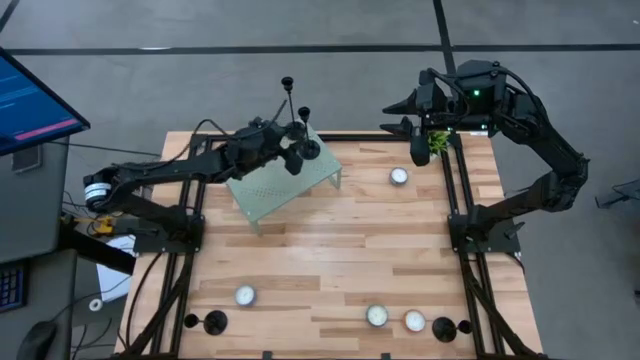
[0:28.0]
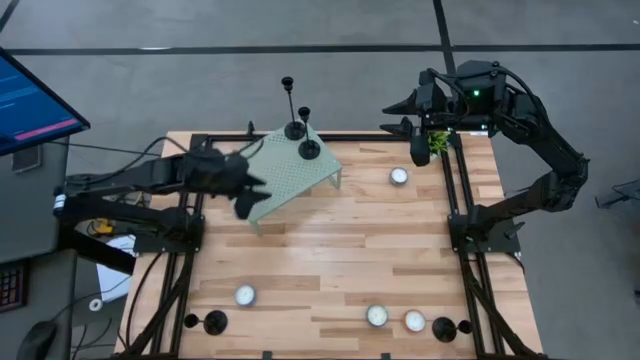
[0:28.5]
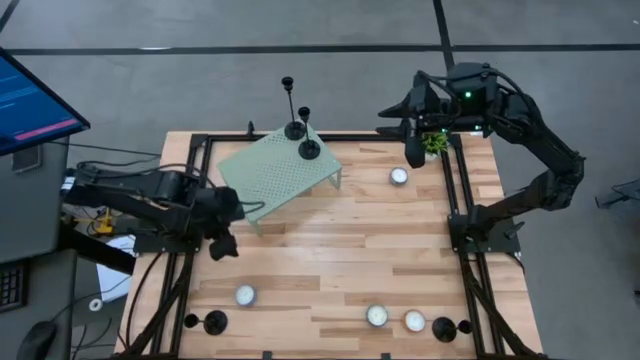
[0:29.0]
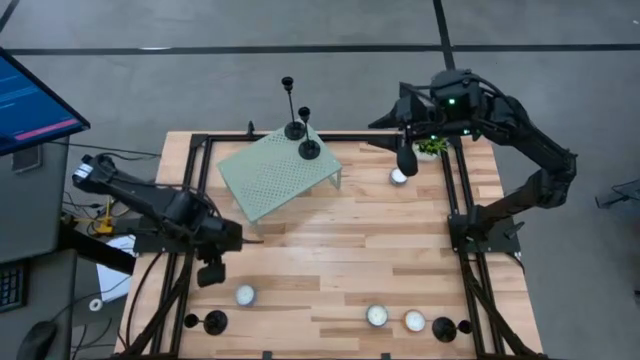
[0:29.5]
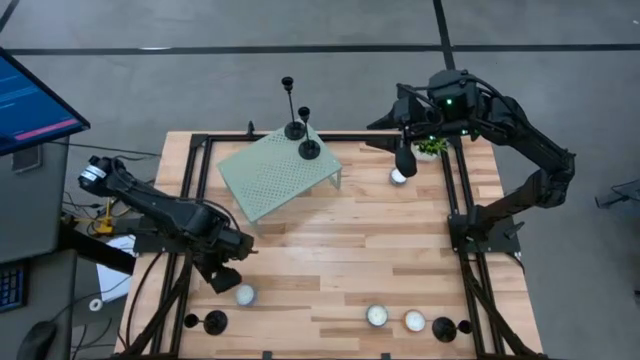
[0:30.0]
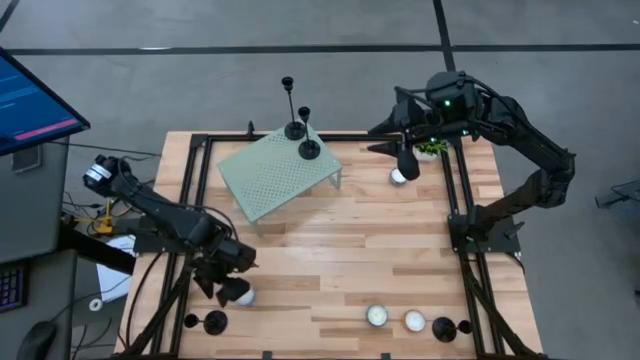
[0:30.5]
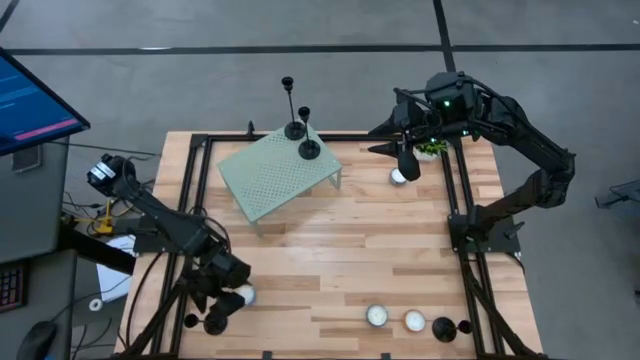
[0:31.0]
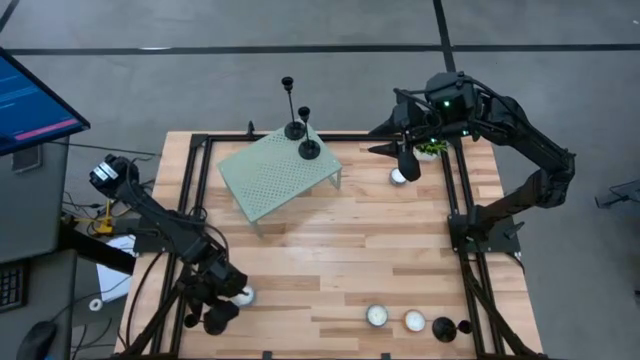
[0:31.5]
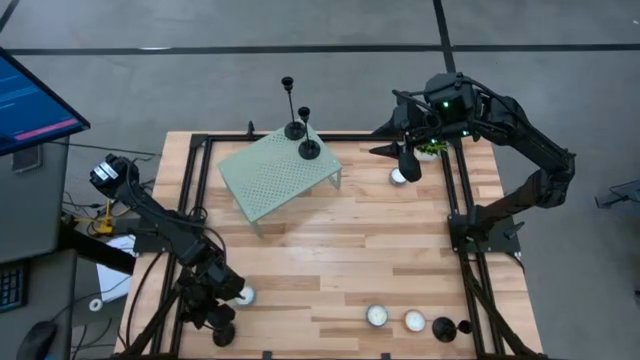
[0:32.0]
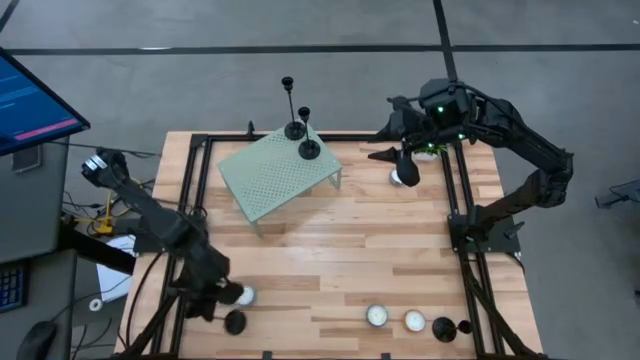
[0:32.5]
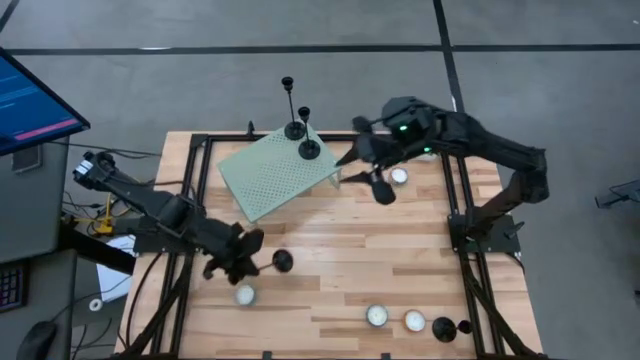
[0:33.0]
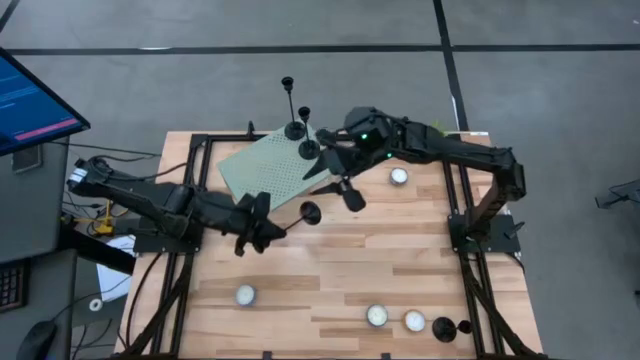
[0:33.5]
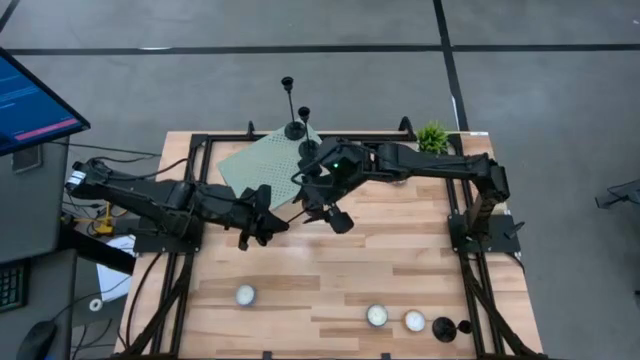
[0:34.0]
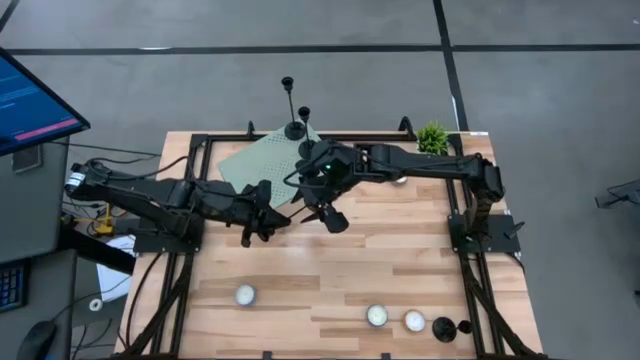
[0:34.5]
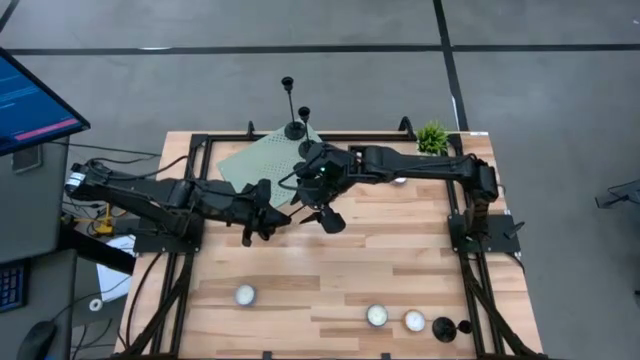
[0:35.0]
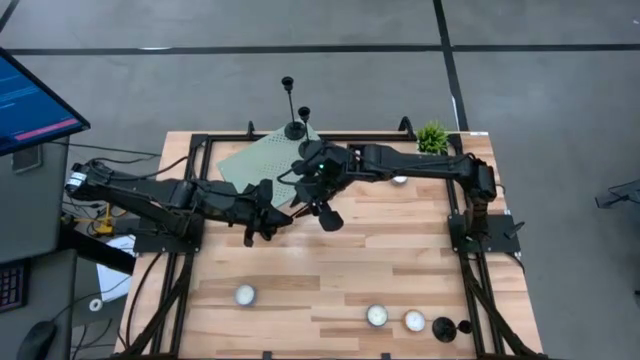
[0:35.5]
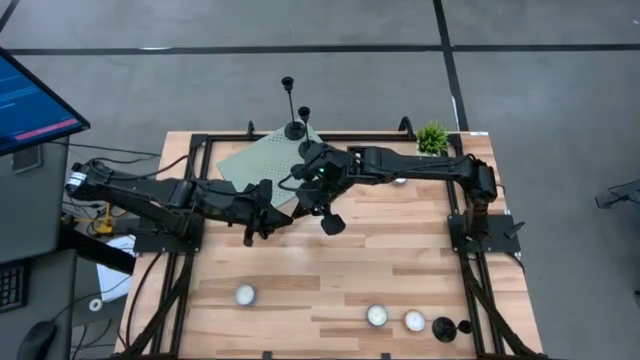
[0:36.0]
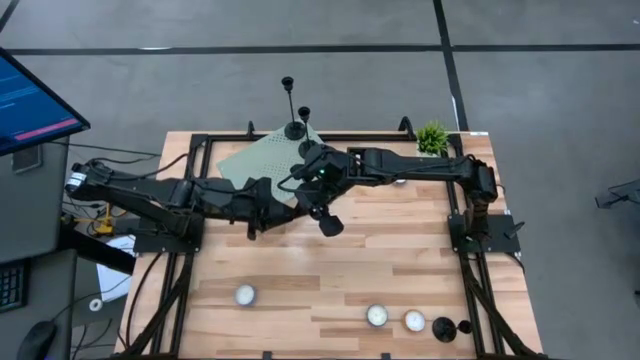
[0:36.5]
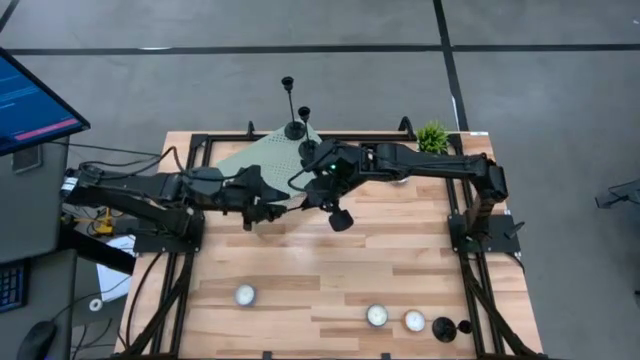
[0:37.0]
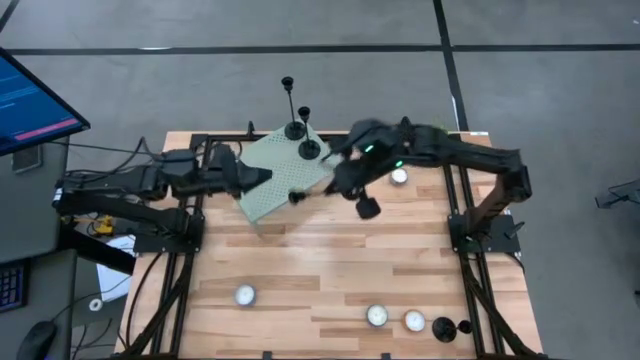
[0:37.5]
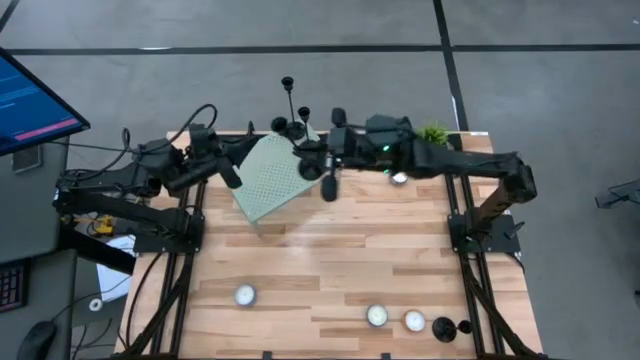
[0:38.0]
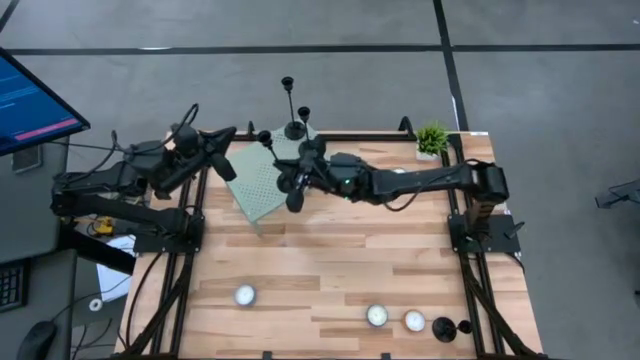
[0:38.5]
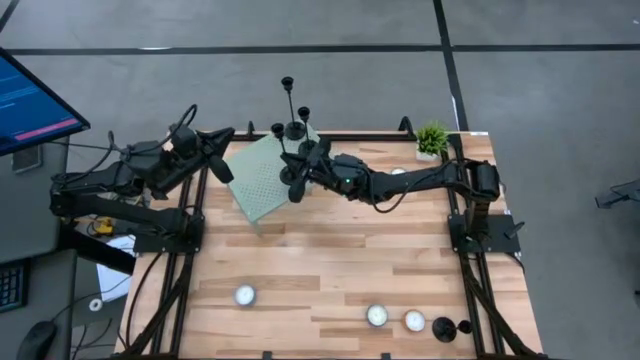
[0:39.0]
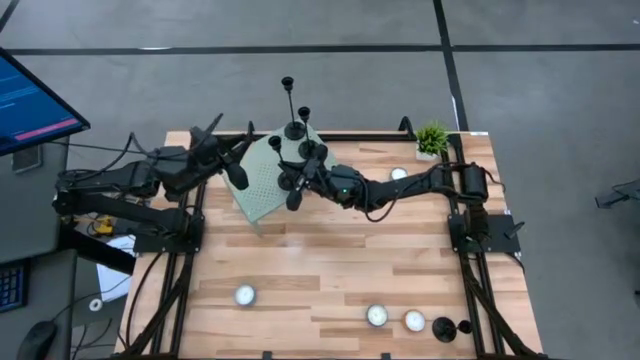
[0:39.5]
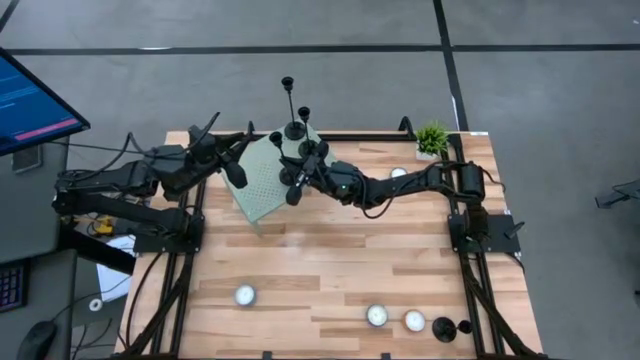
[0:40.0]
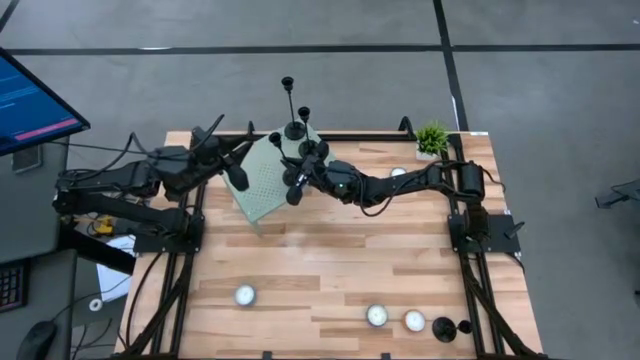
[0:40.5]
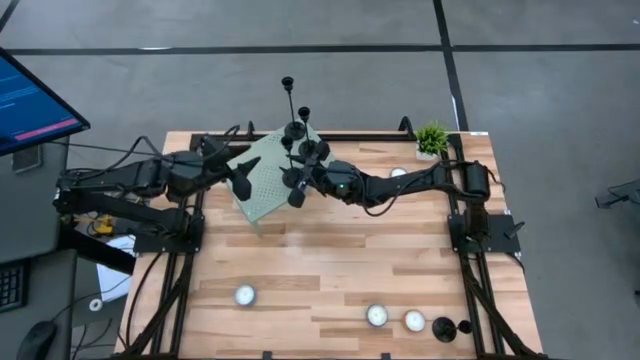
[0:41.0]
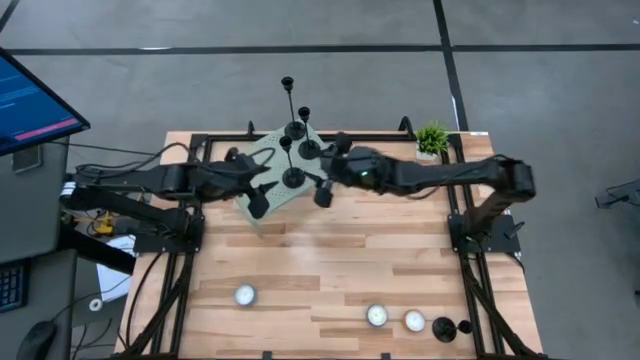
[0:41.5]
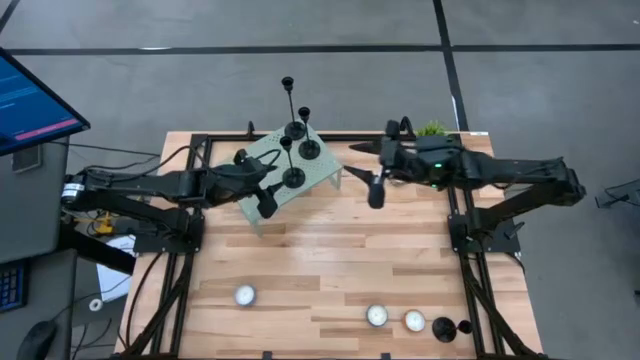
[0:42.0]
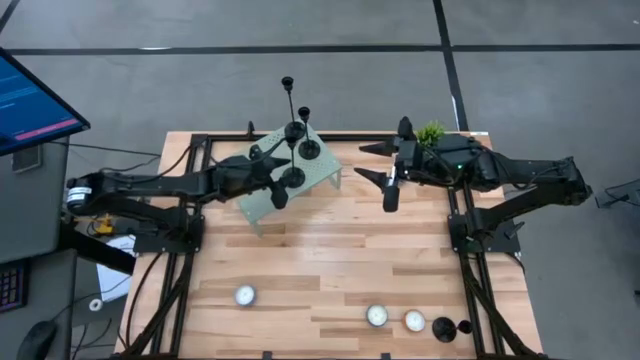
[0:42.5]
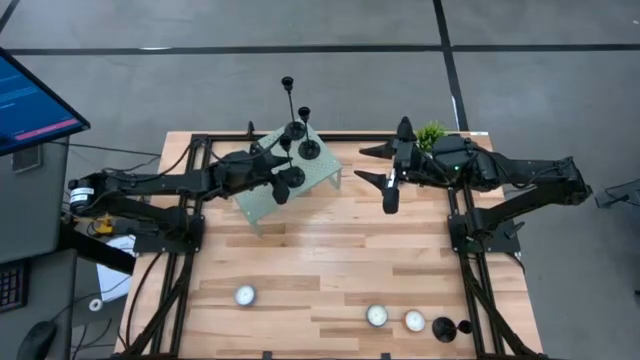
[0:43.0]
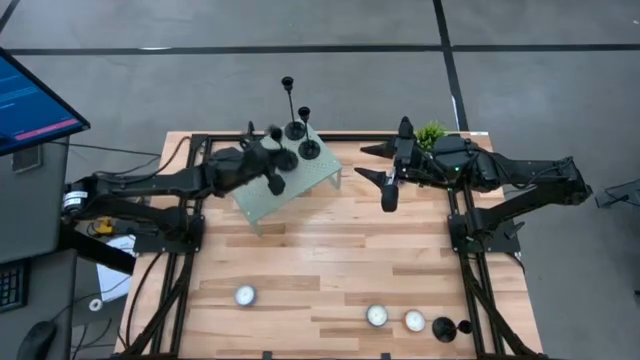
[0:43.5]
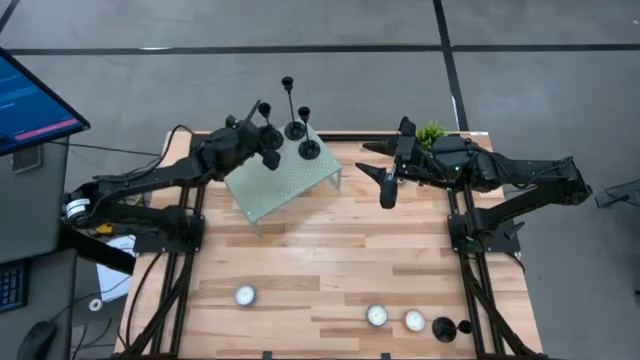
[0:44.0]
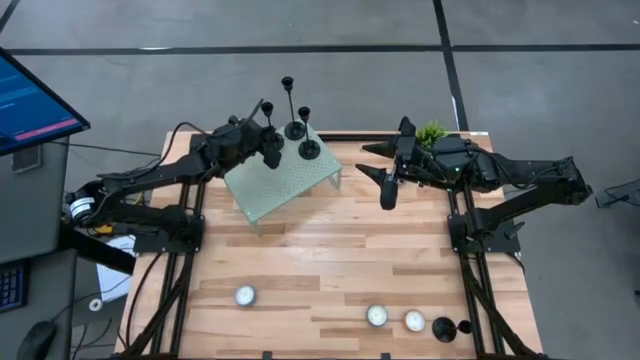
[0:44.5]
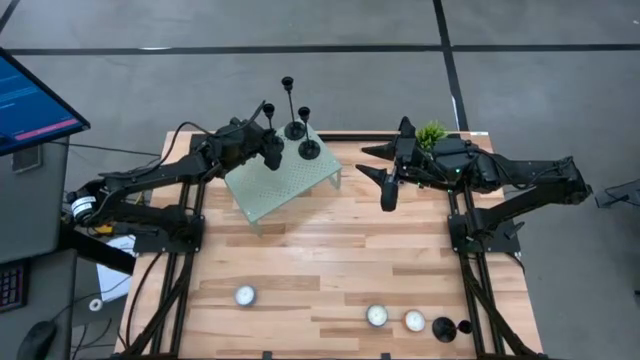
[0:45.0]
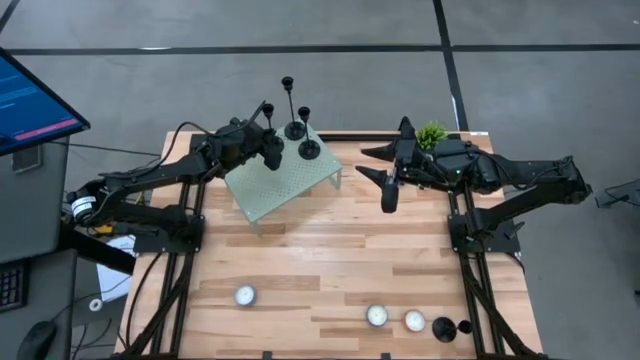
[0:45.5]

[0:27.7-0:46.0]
Task: Pick & Place candle stick holders
Put the black candle holder on the shelf
